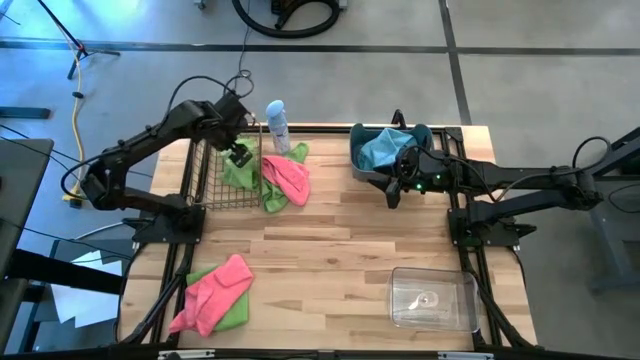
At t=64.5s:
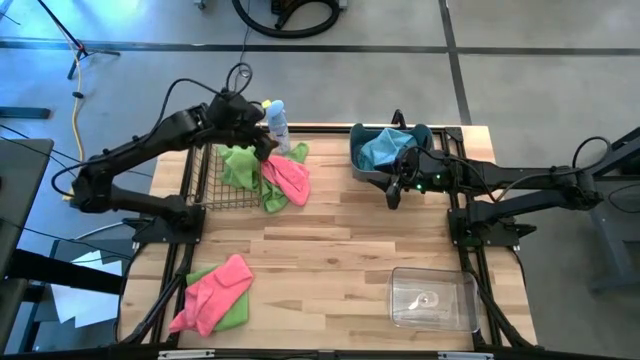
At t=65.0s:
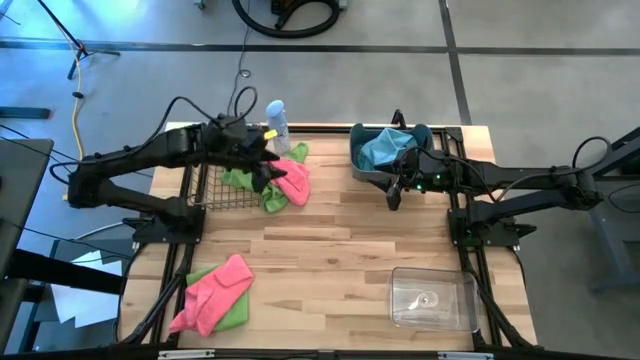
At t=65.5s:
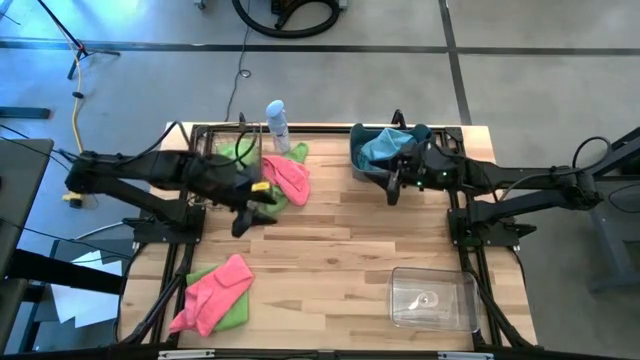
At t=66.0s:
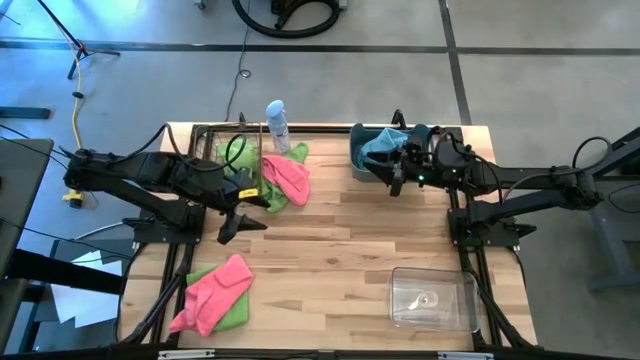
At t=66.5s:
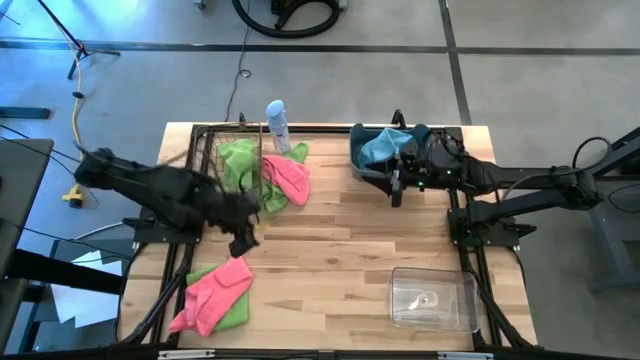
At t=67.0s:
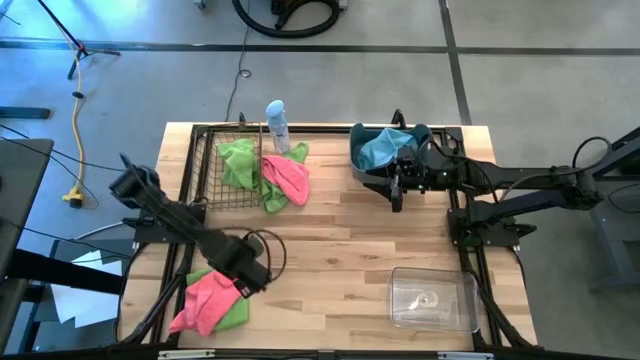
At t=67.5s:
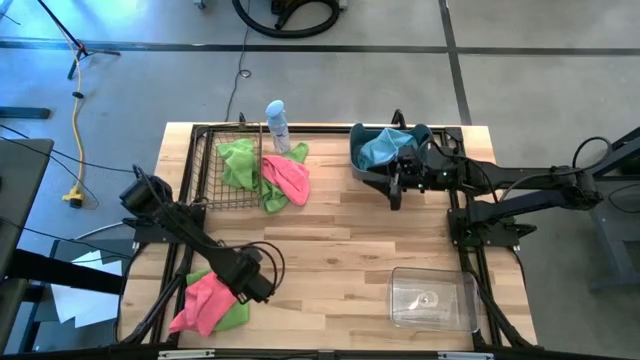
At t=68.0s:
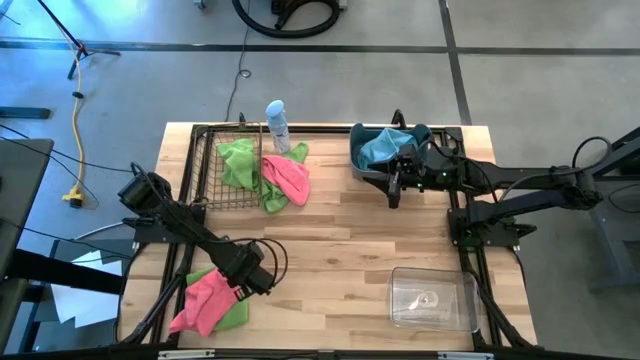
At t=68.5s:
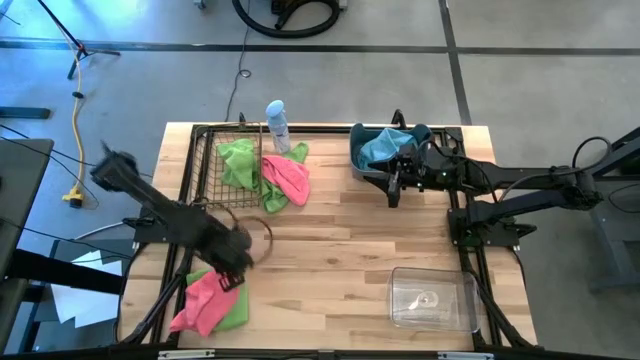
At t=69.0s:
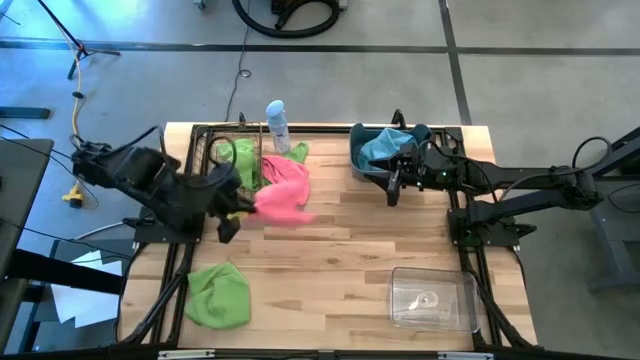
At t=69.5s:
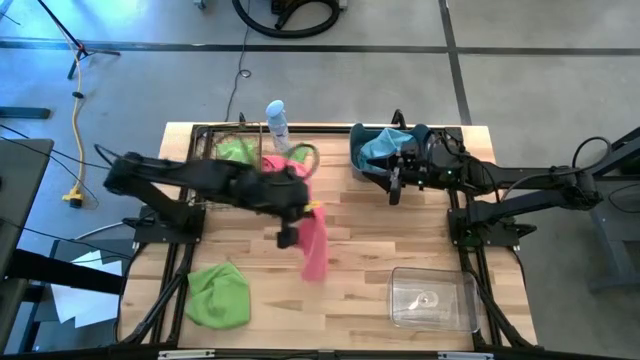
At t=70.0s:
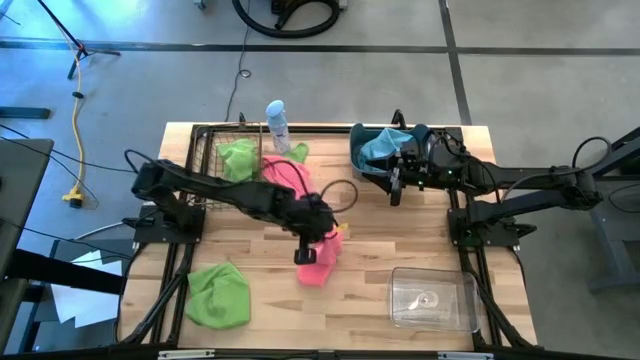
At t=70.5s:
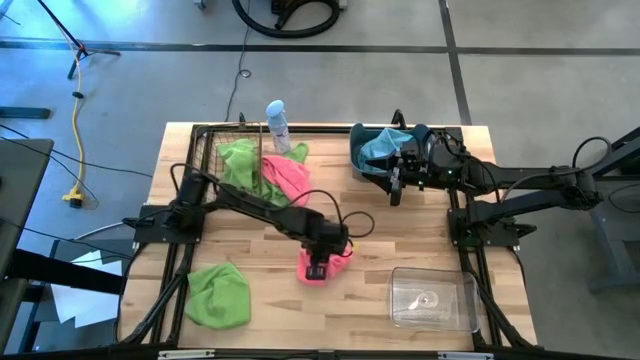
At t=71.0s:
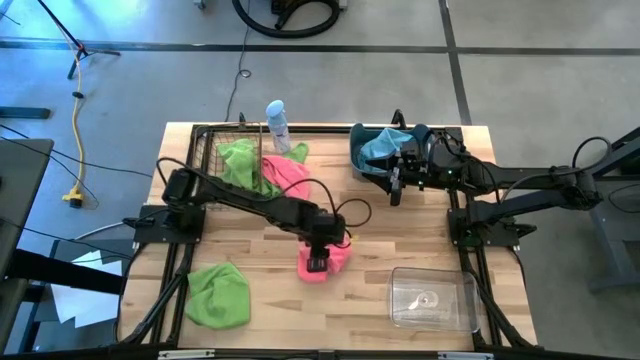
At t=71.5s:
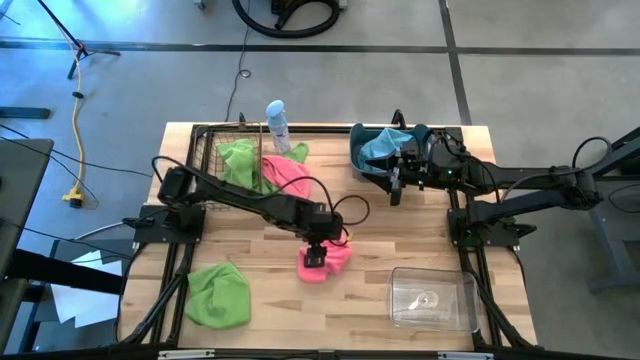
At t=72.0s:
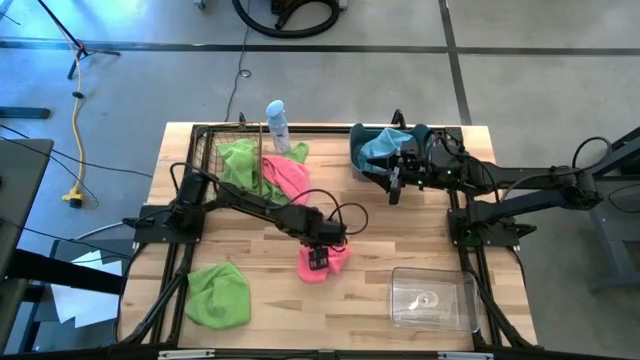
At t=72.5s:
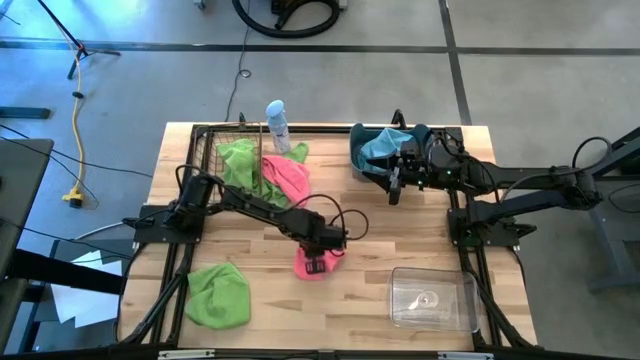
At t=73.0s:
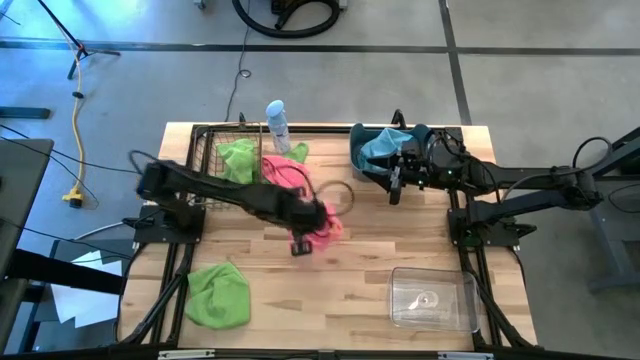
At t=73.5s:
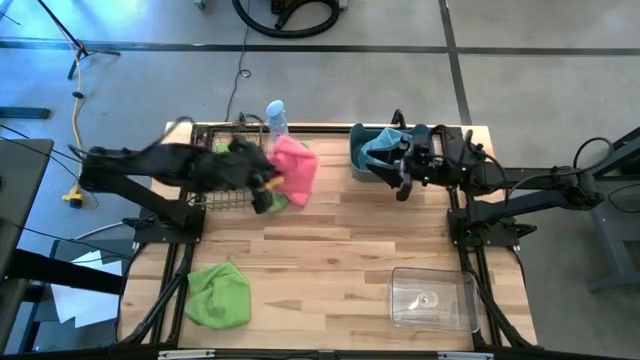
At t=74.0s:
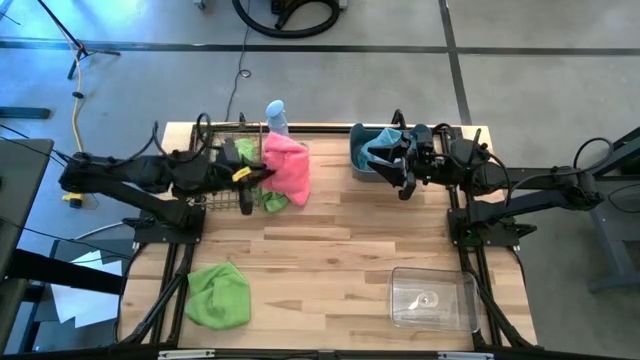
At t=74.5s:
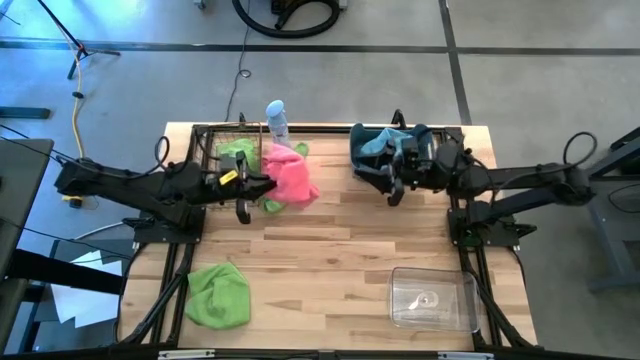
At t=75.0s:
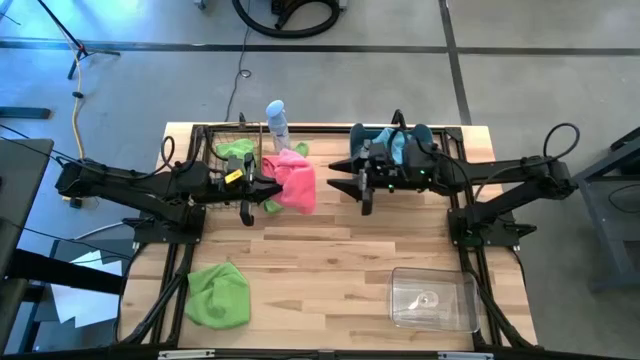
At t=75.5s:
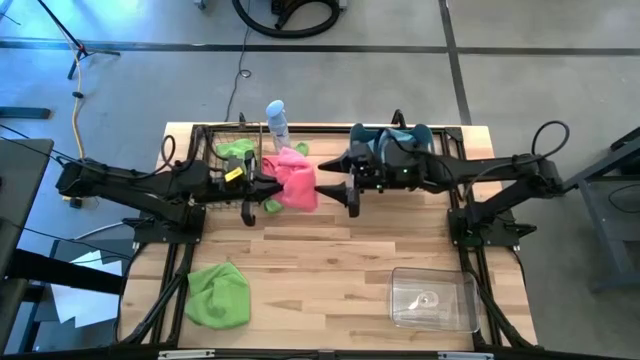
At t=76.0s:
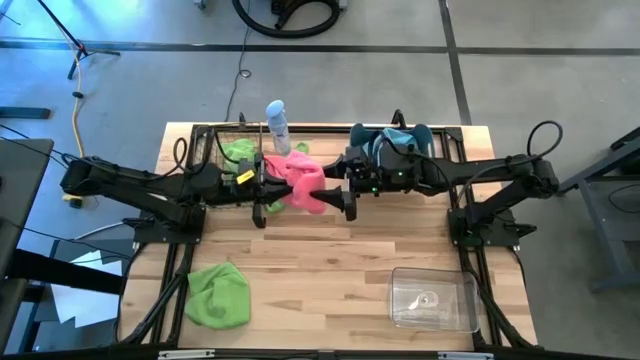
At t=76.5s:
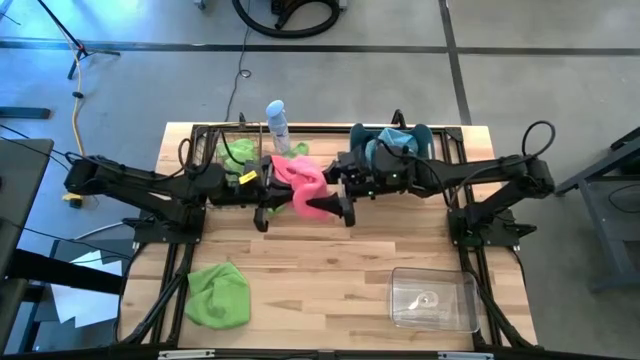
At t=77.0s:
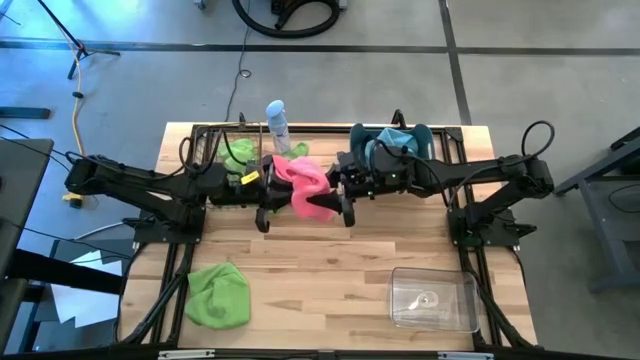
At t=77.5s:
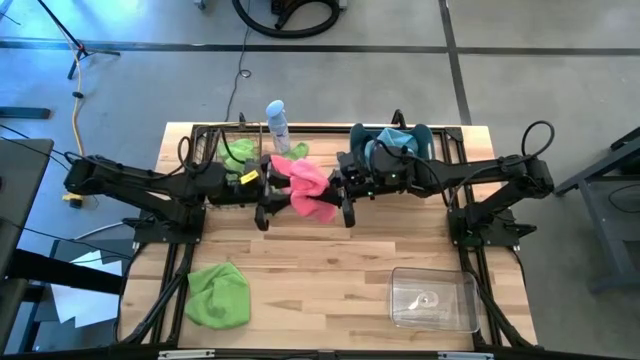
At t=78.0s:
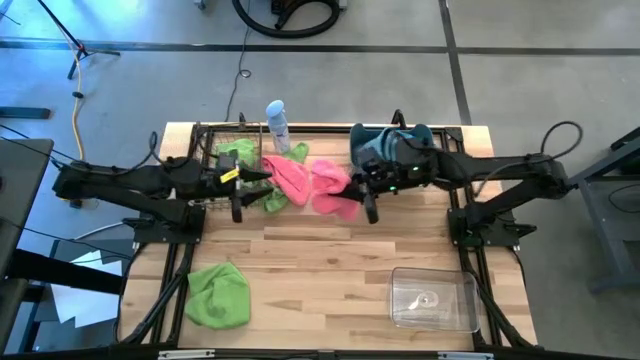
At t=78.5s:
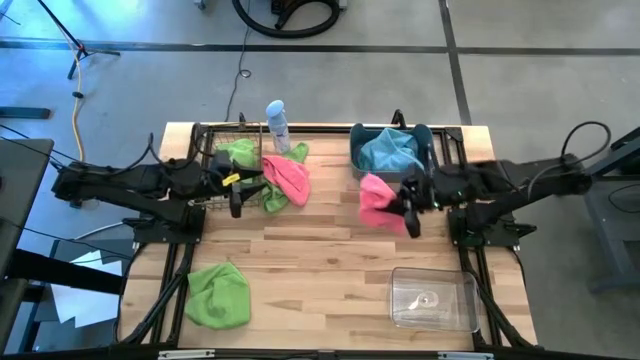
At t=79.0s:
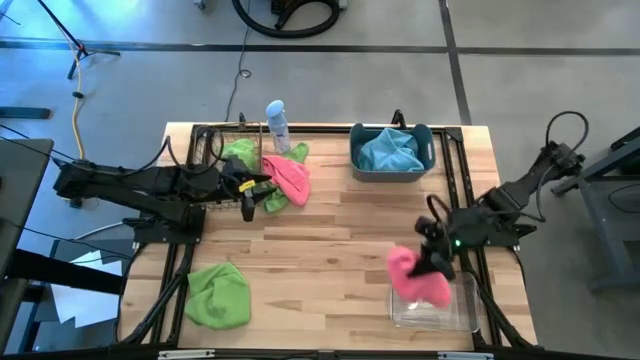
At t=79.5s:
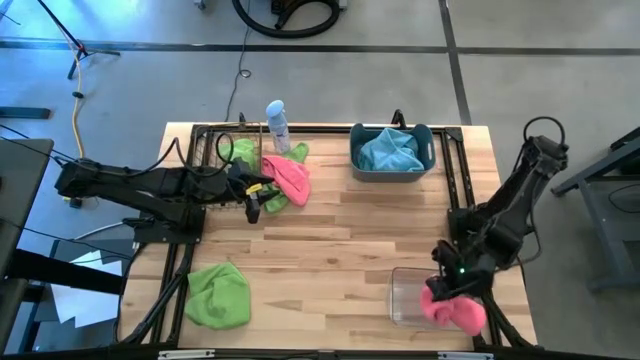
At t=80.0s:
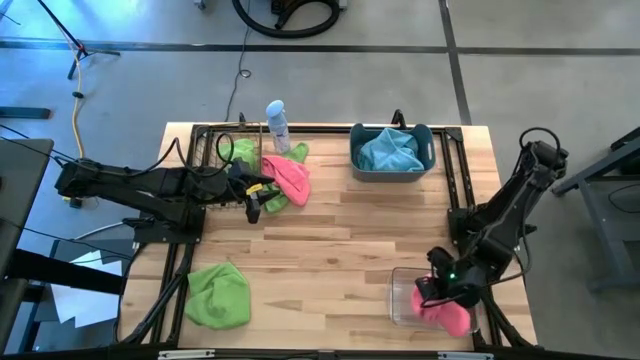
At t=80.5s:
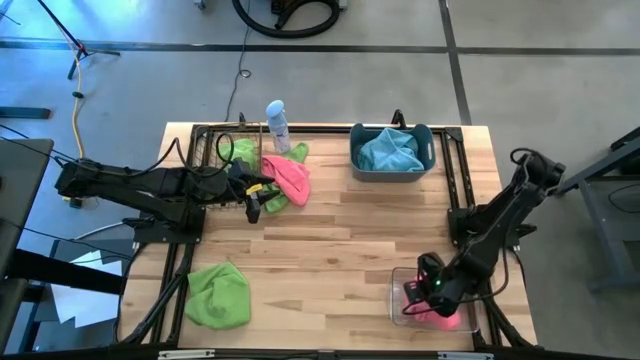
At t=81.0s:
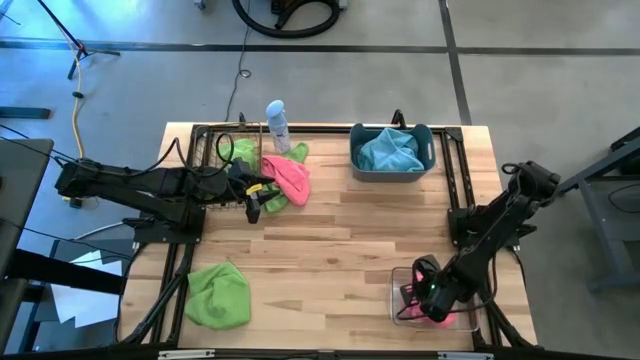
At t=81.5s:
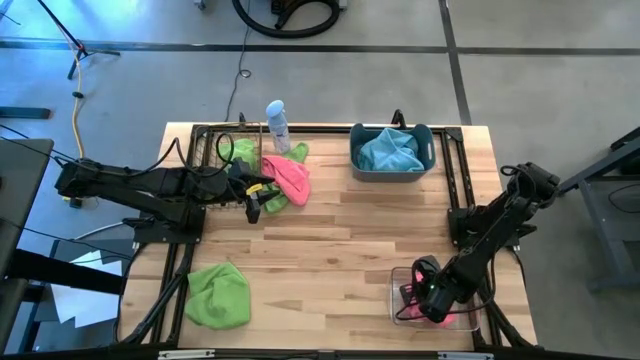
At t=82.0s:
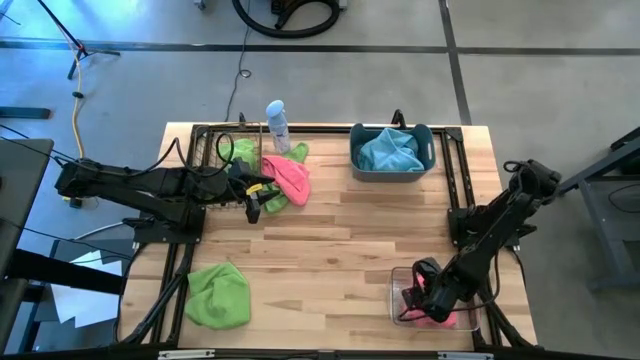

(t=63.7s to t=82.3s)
Task: Sort microfiber towel by color & place in baskets
Put the bottom pink towel into the transparent bin

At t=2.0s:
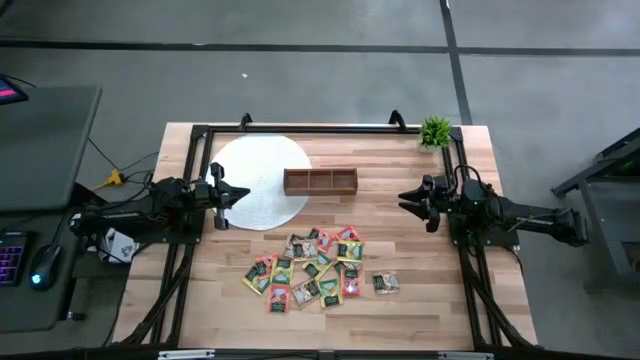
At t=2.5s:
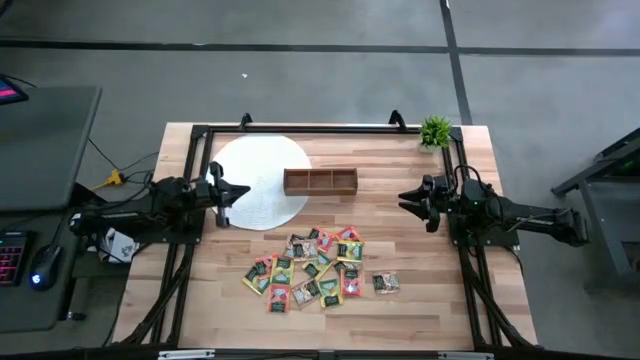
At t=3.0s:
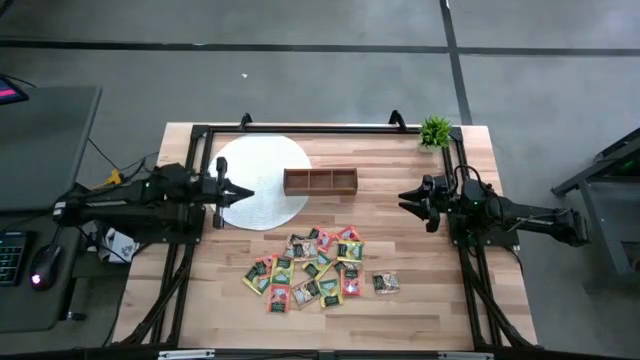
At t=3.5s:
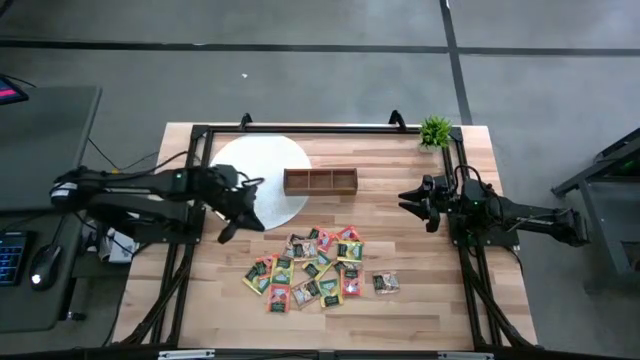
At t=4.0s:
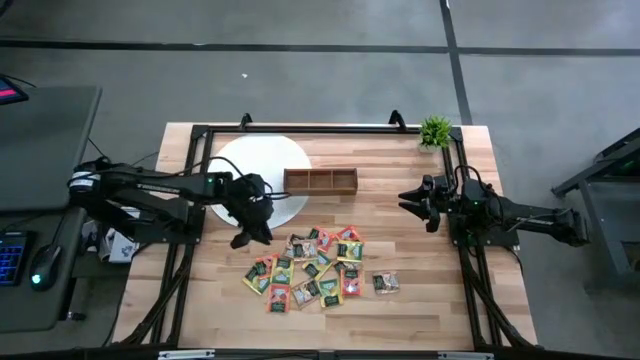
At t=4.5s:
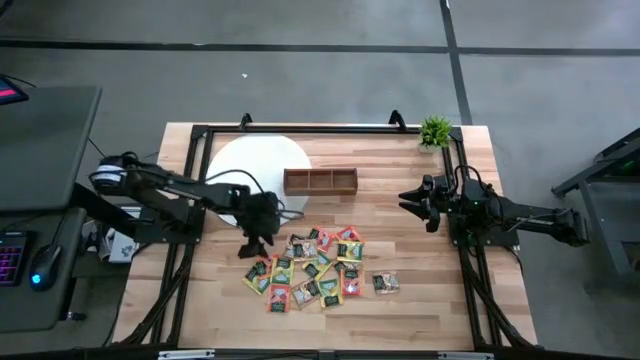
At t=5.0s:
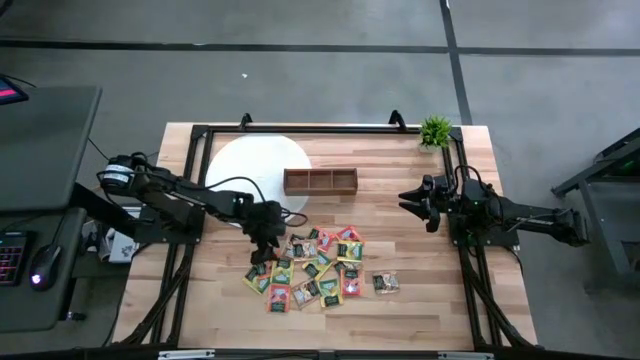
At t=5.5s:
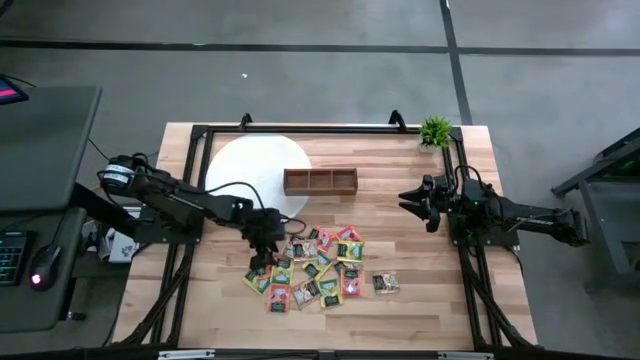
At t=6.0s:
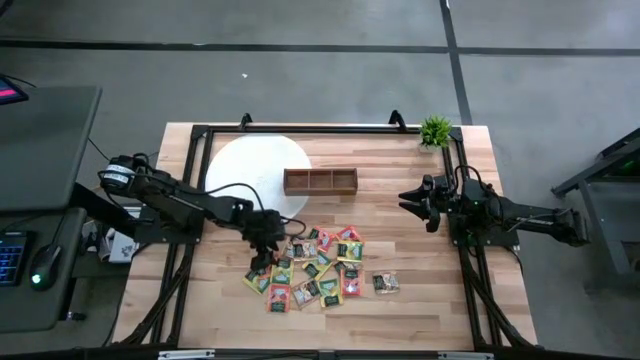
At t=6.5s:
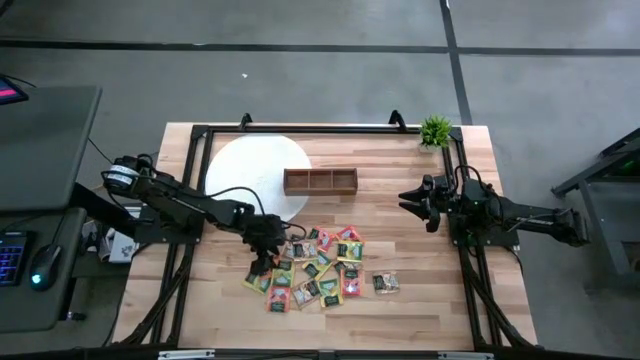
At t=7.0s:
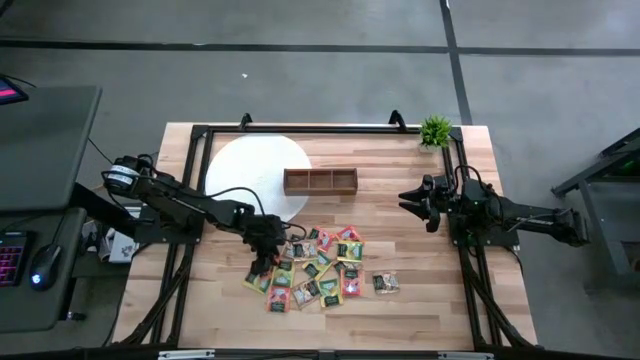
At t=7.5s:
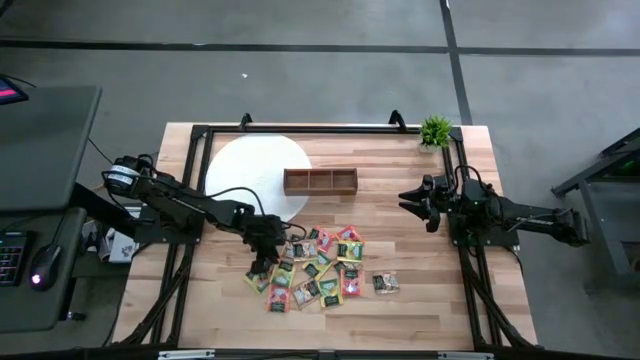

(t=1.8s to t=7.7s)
Task: Pick & Place Tea
Put the yellow tea bag into the left compartment of the wooden organizer
